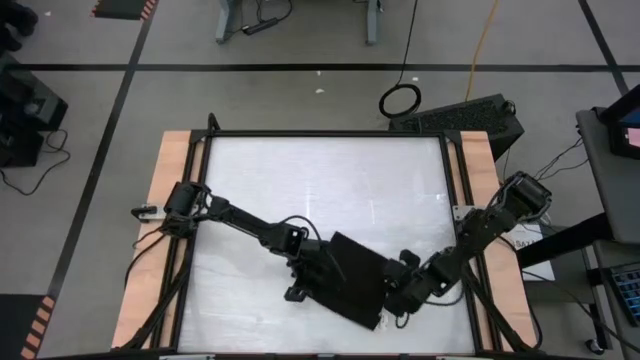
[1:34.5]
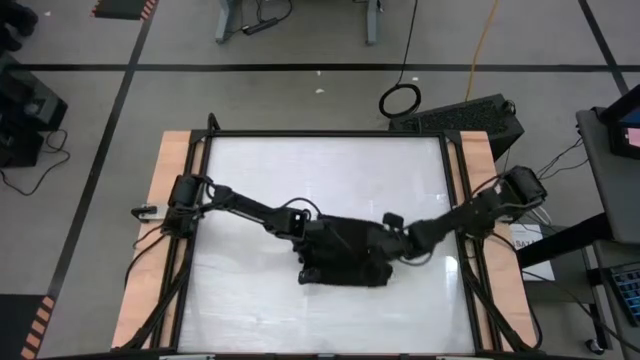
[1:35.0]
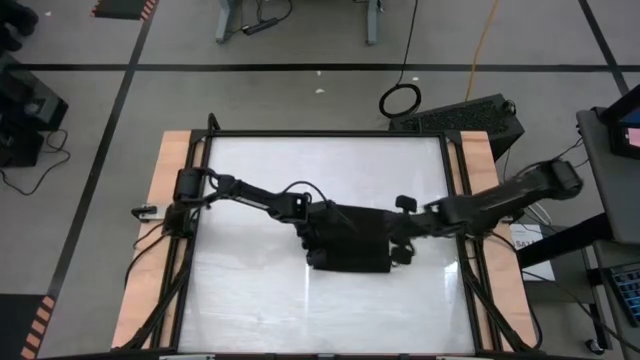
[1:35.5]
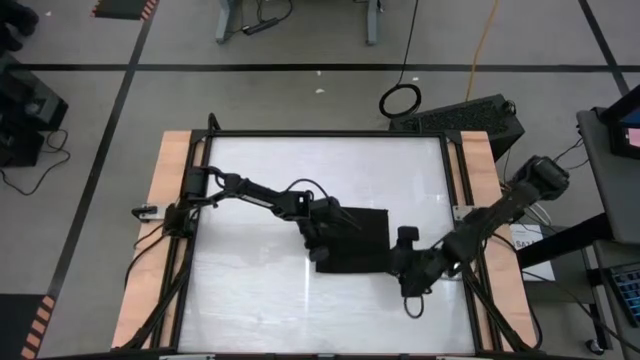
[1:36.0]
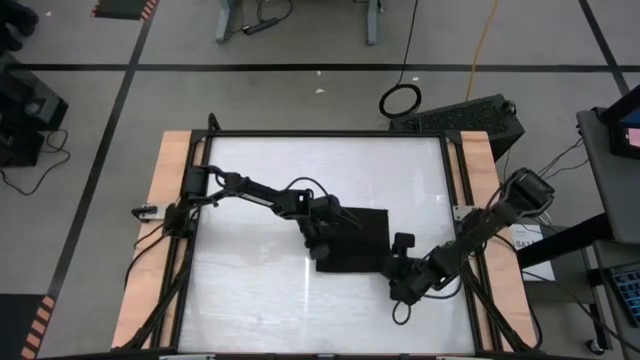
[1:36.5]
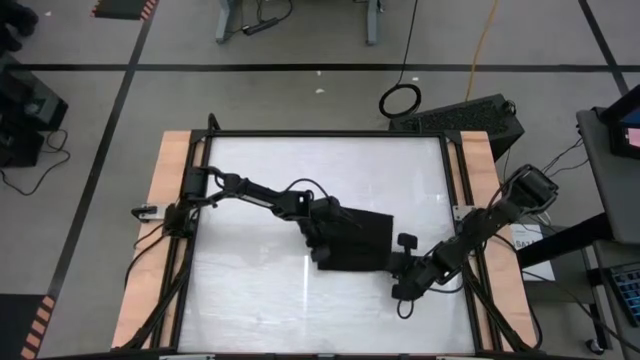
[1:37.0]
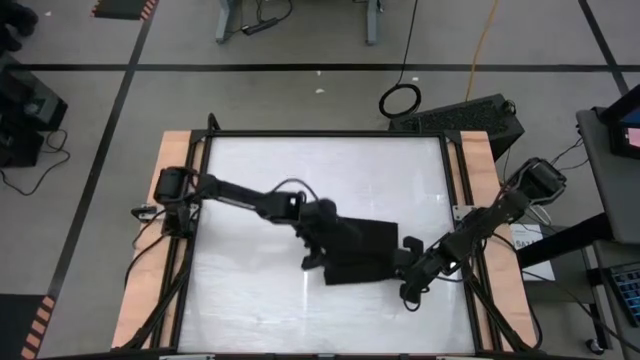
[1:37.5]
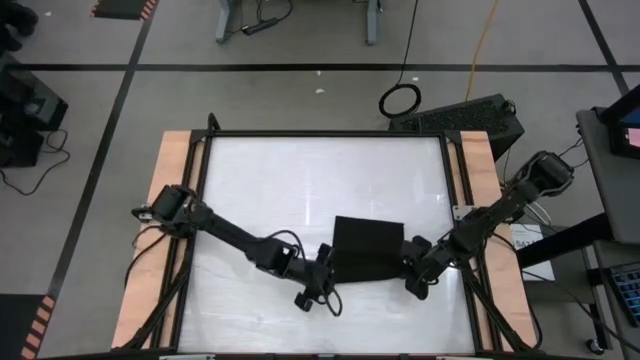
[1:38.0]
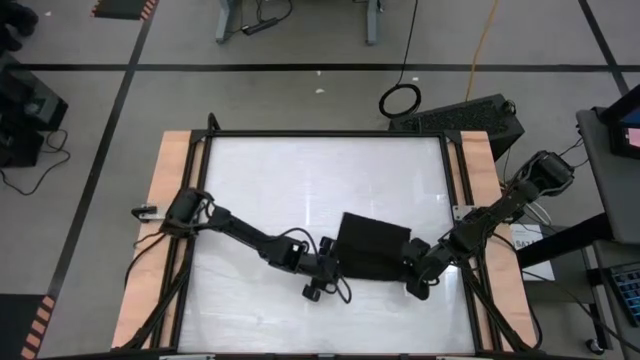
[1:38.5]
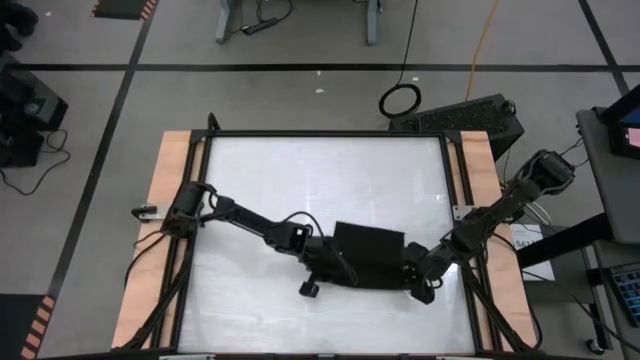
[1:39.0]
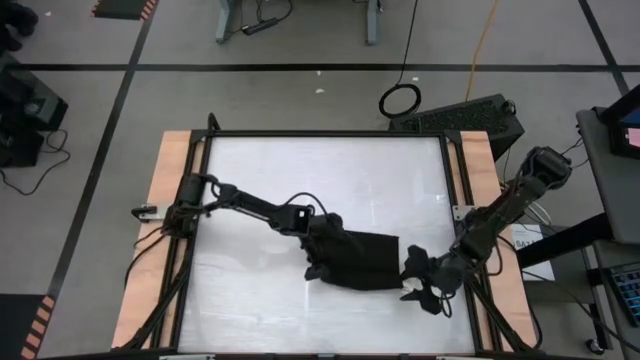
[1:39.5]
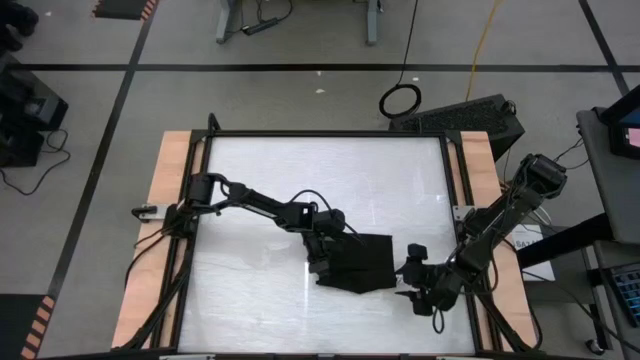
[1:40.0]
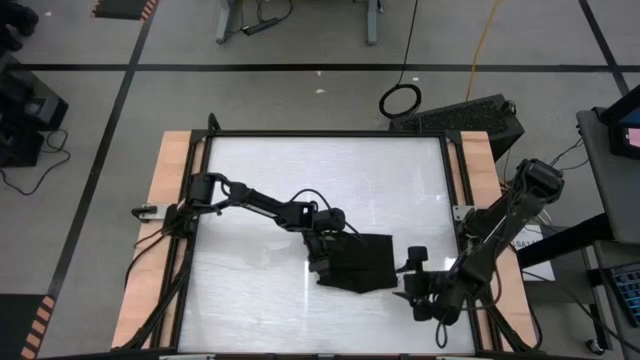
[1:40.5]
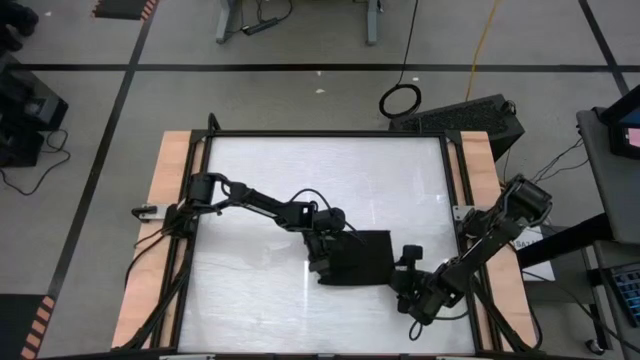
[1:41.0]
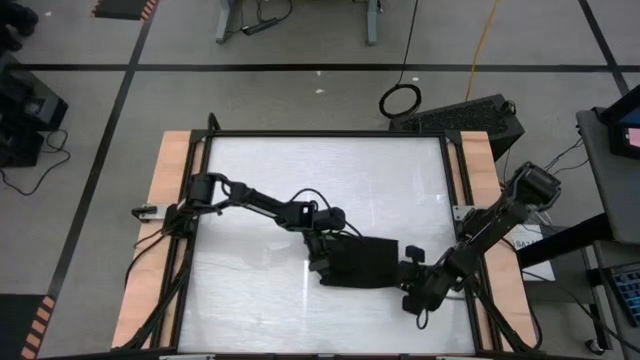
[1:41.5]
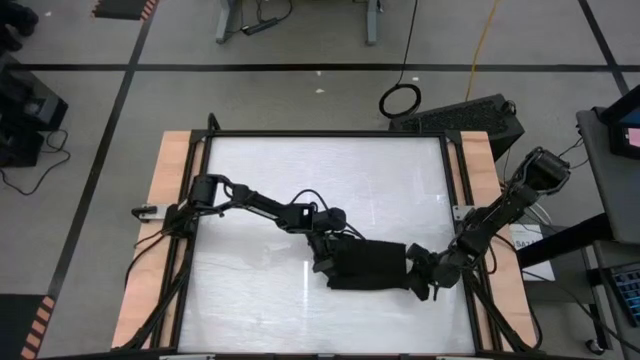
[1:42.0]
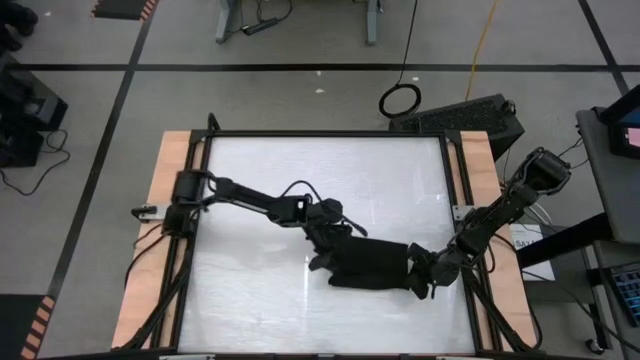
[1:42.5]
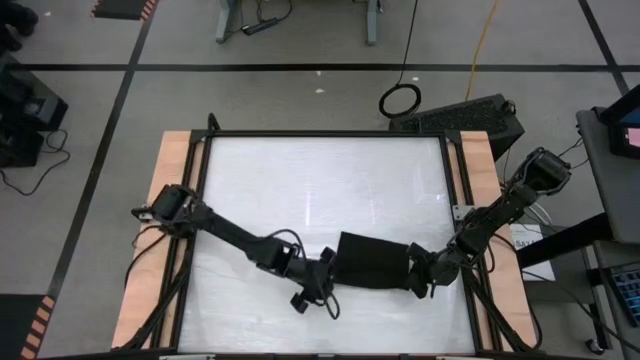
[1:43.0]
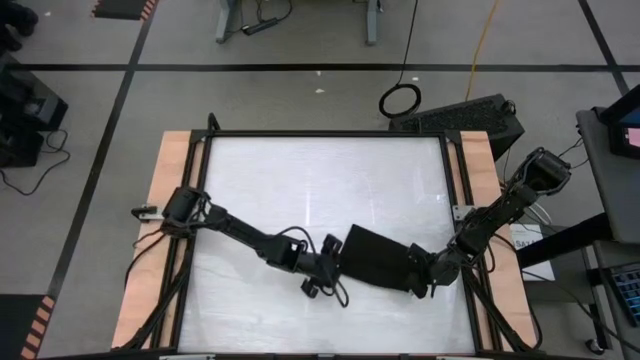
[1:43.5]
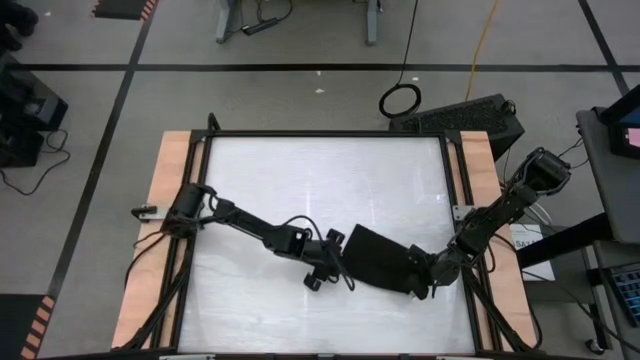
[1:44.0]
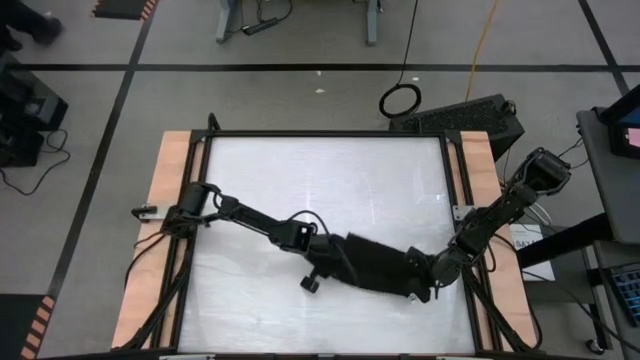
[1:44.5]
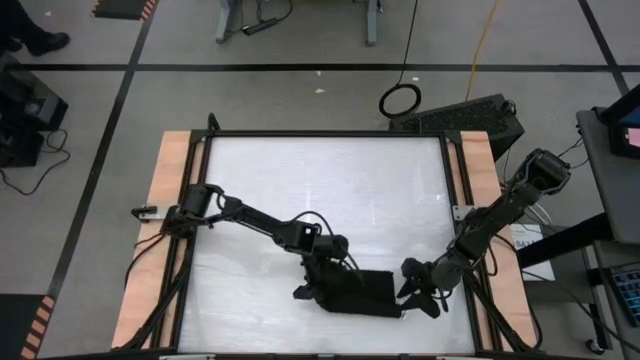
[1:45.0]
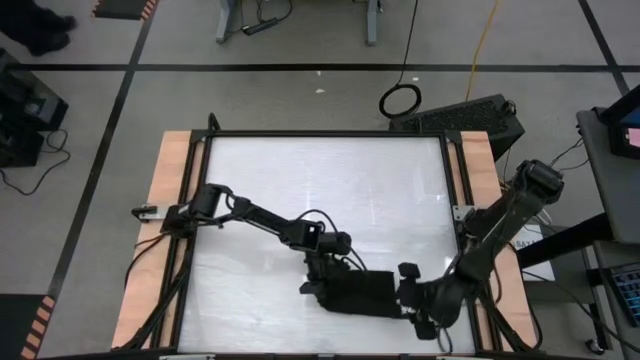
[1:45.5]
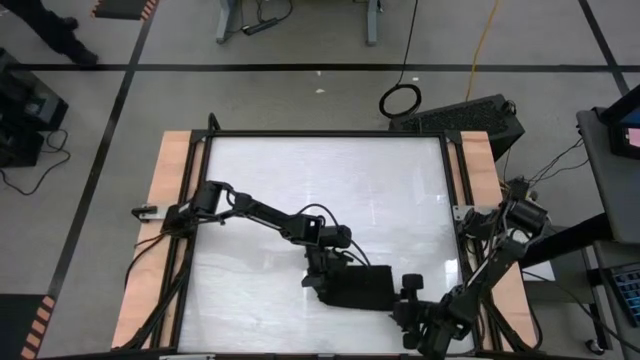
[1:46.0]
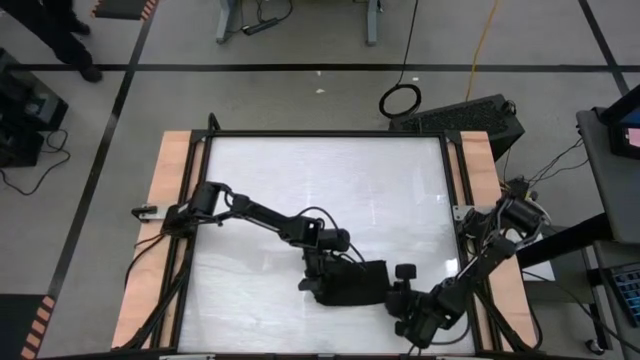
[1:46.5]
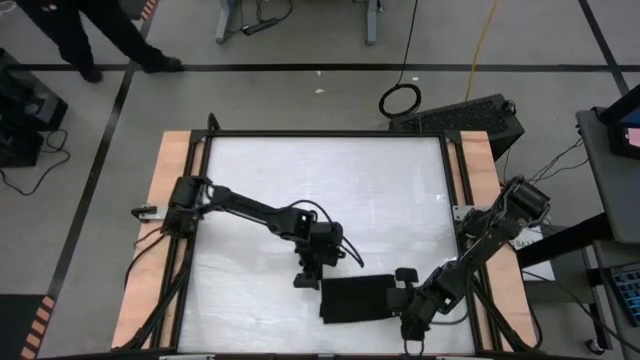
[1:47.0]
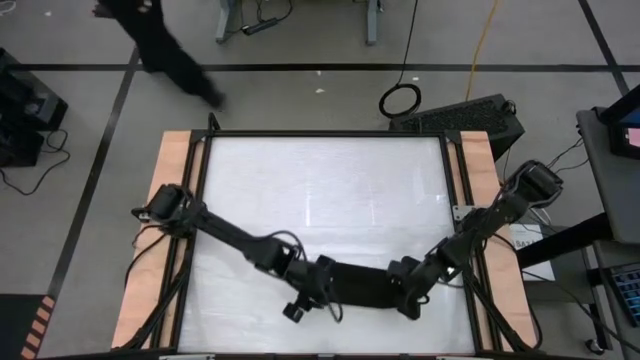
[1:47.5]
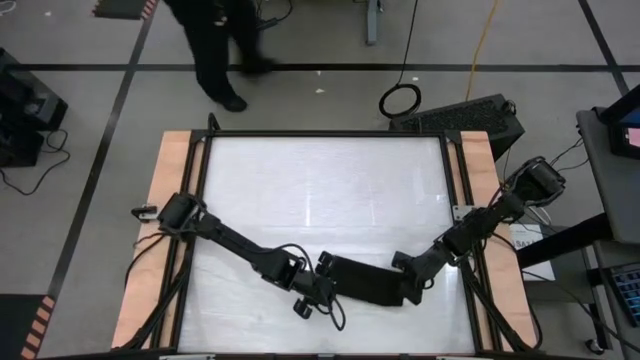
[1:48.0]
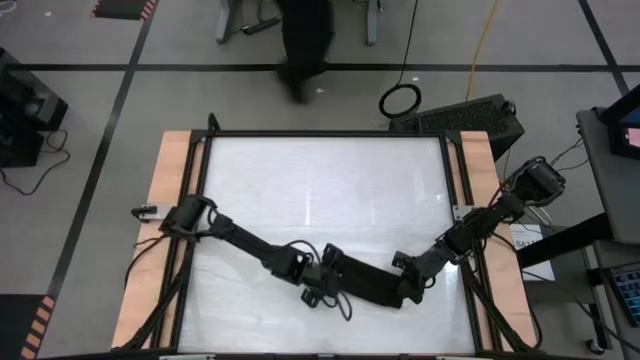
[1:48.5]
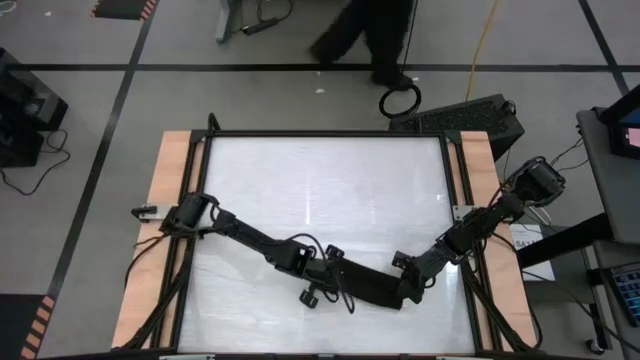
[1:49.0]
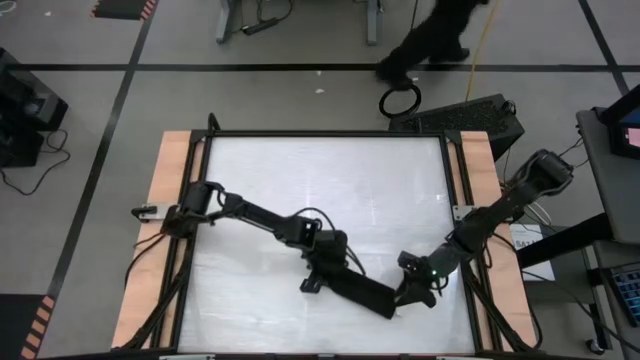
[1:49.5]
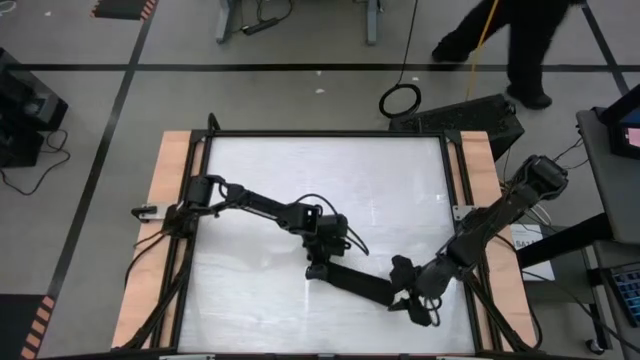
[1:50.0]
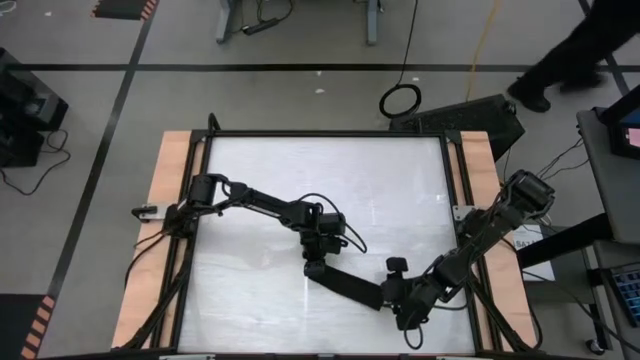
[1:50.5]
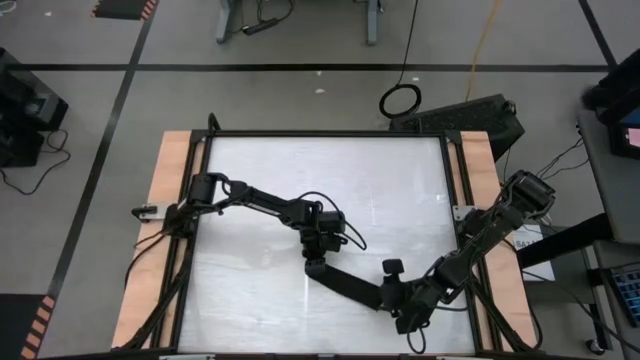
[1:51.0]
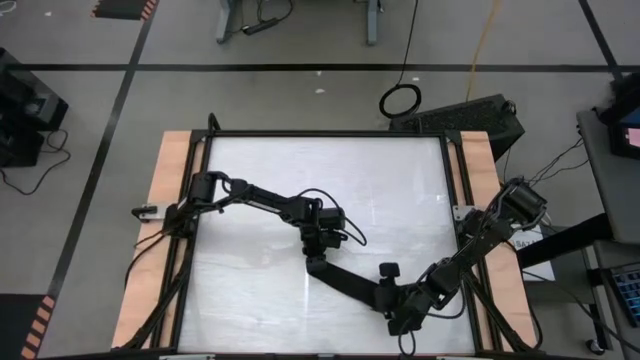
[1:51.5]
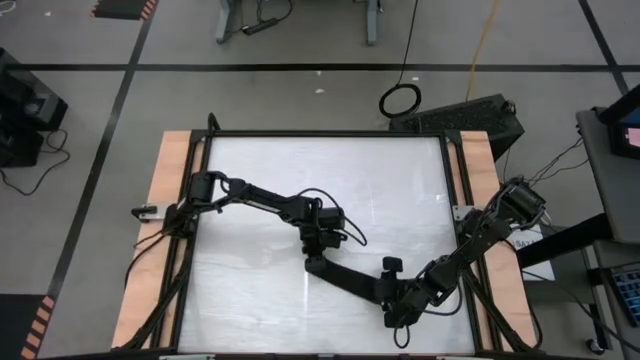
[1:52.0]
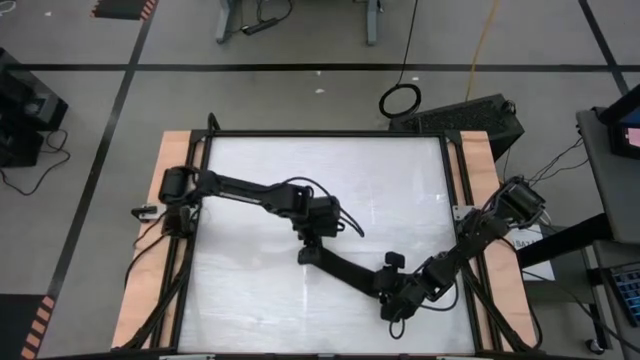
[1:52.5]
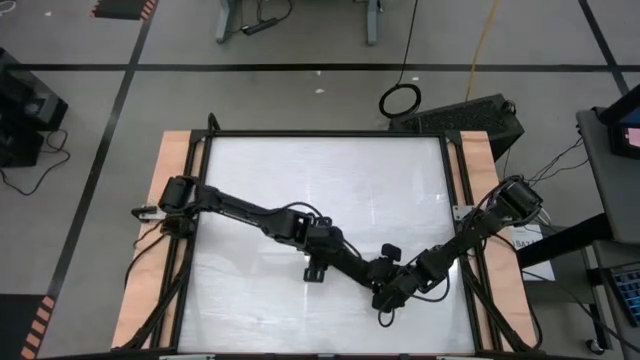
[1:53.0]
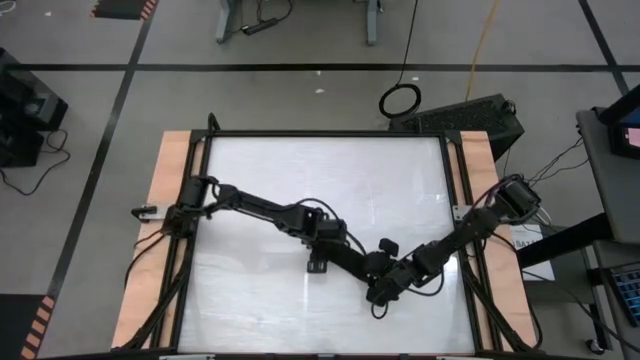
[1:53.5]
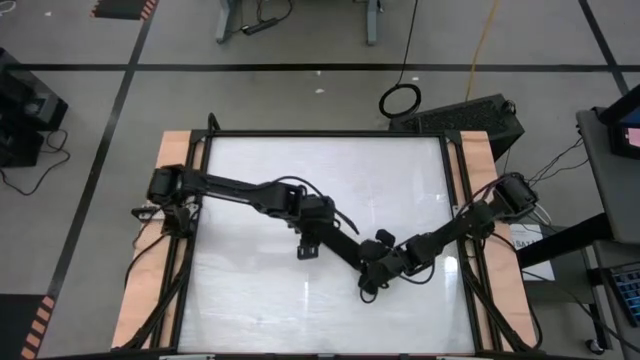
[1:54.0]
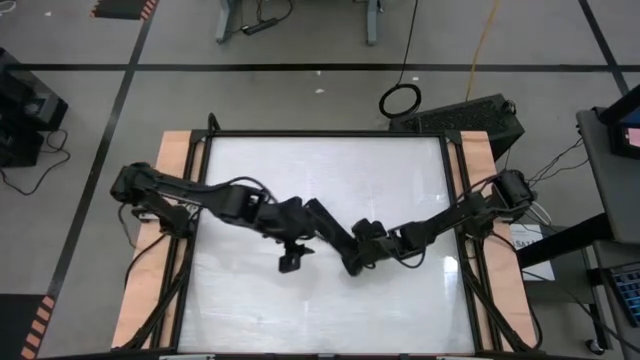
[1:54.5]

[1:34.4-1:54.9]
Task: Roll towel into tight, uniform cylinder
Roll the black towel
